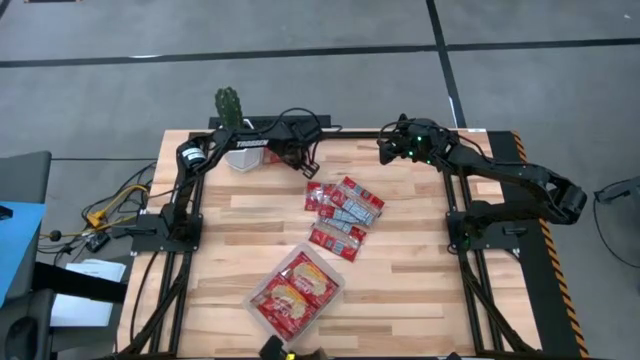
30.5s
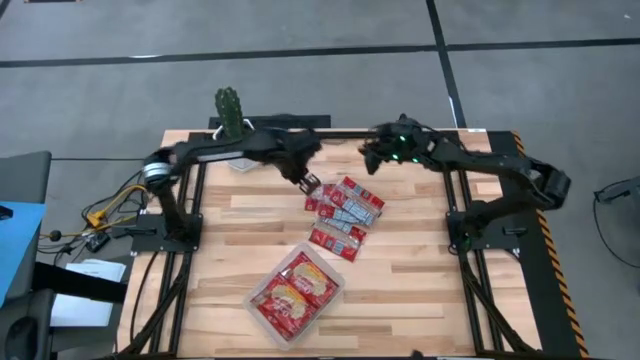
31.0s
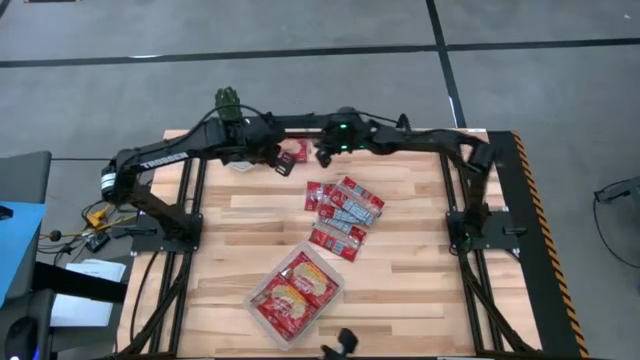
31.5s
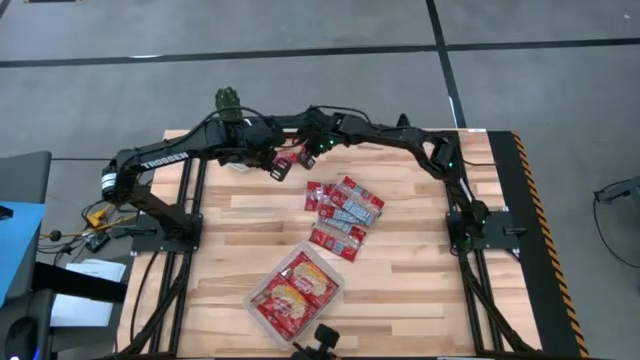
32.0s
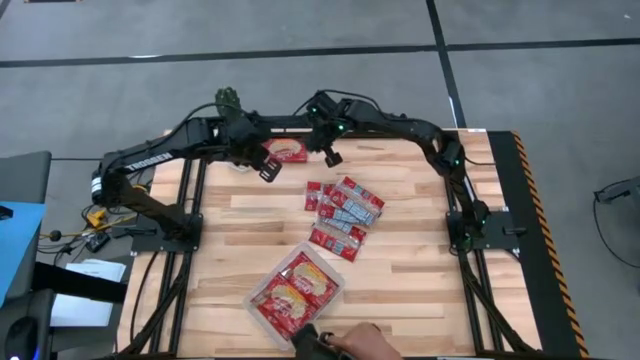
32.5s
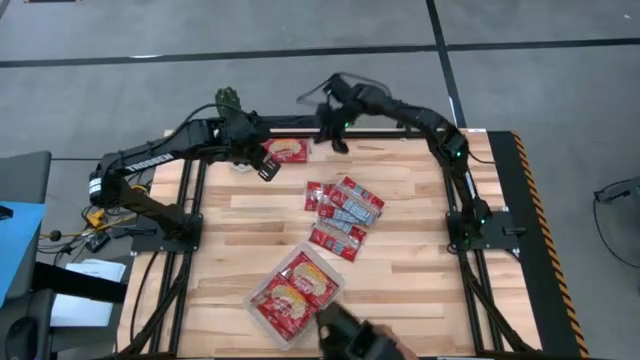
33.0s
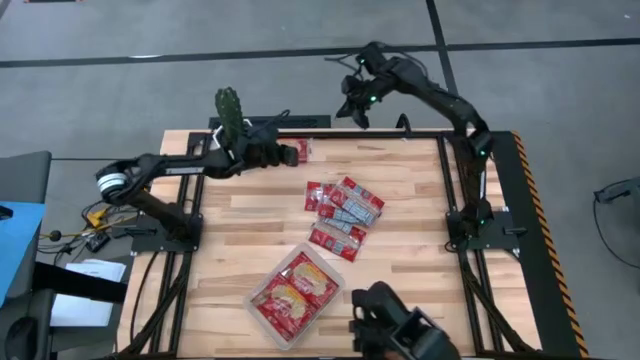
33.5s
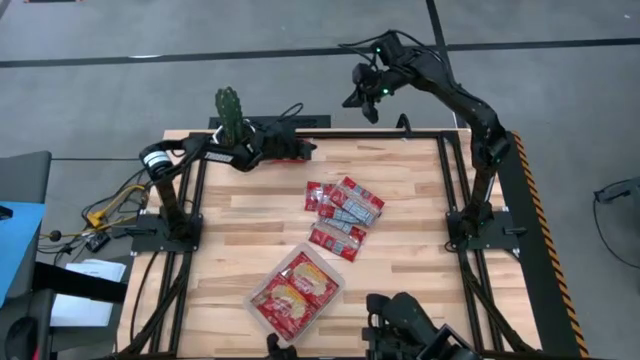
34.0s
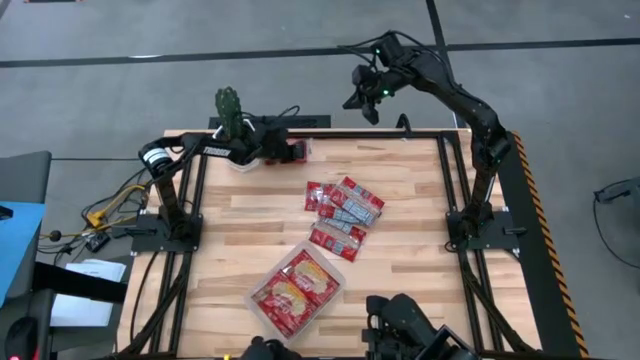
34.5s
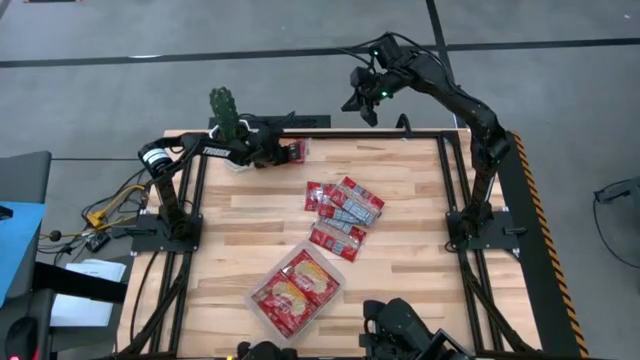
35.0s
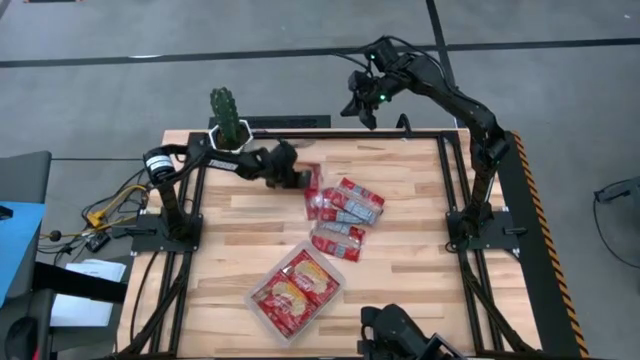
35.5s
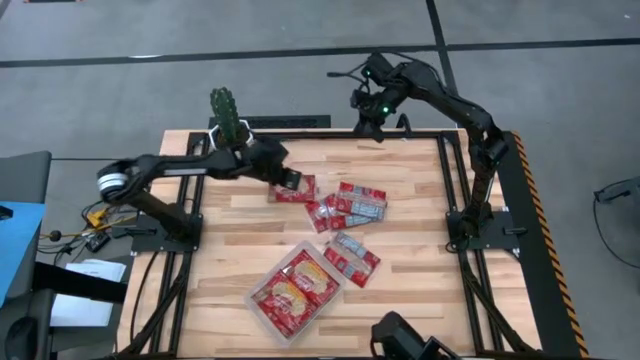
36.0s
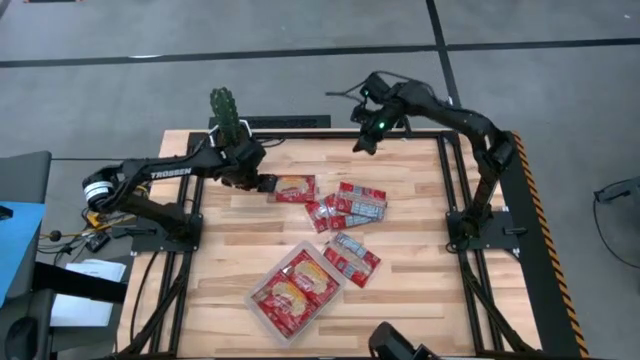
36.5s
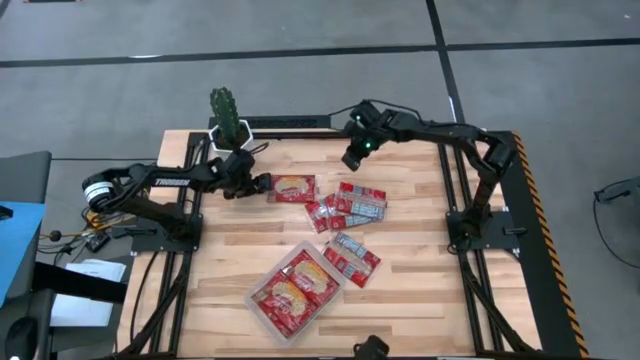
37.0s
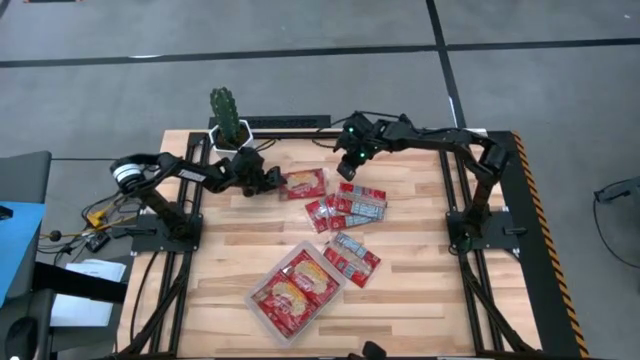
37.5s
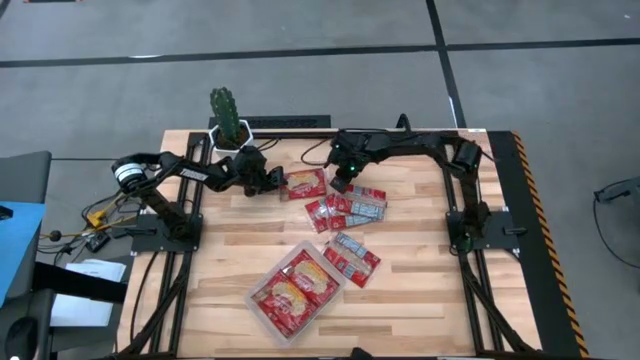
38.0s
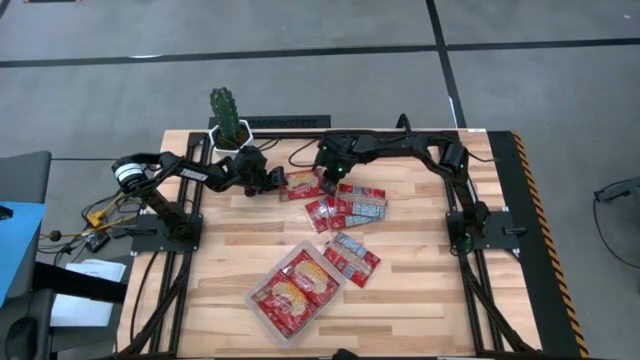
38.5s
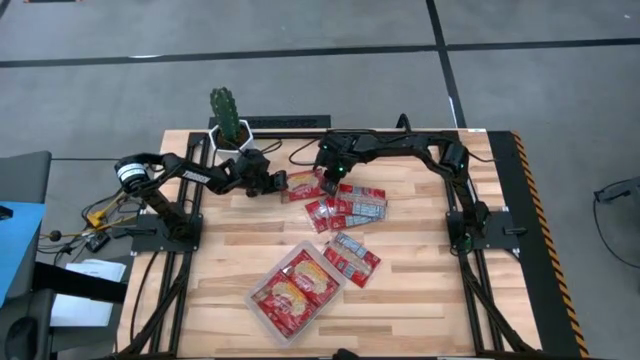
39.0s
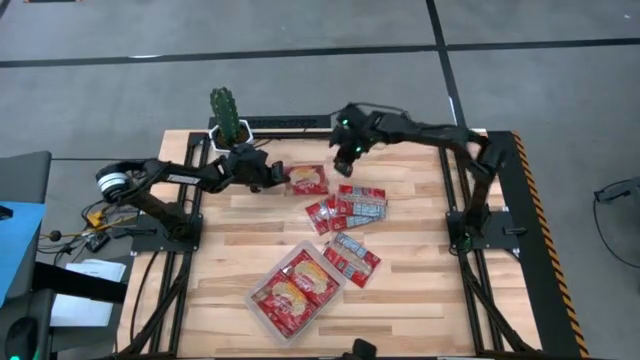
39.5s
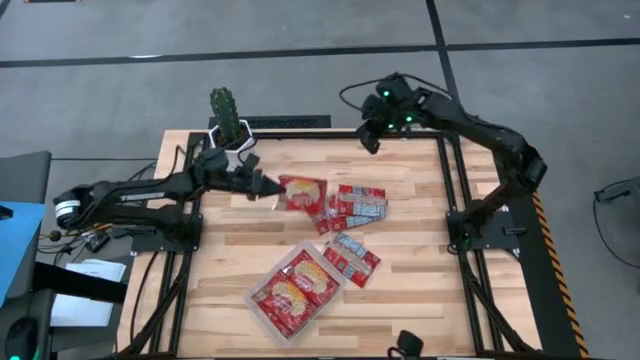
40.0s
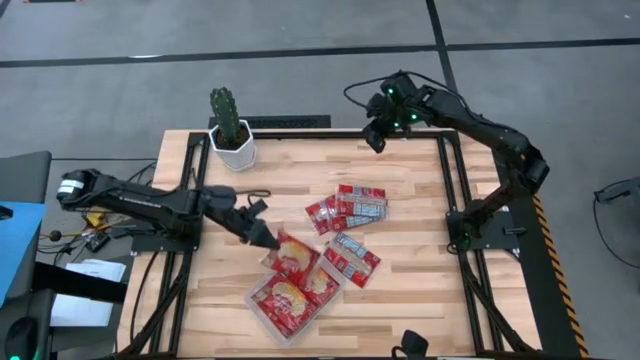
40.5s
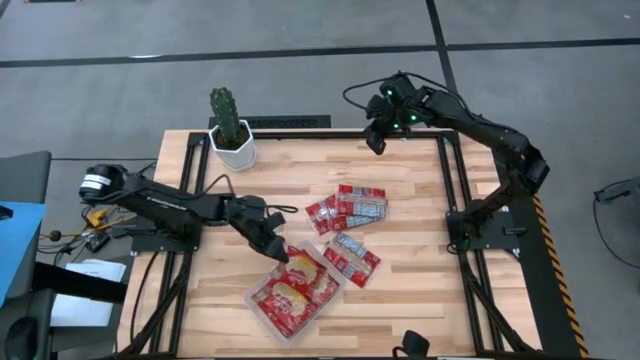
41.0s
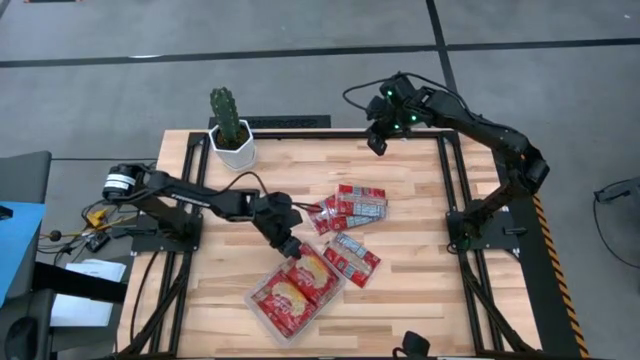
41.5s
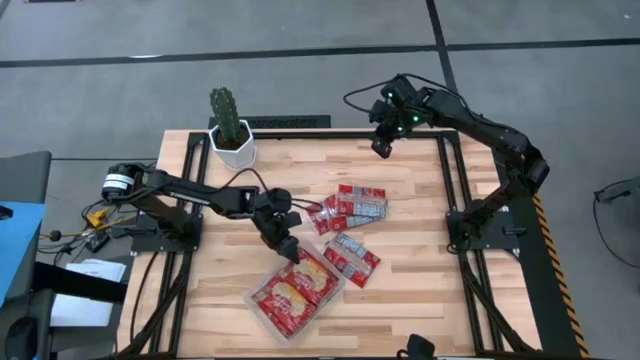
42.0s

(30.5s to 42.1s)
Task: Sort popcorn bags into baskets
Put the red popcorn bag into the transparent bin

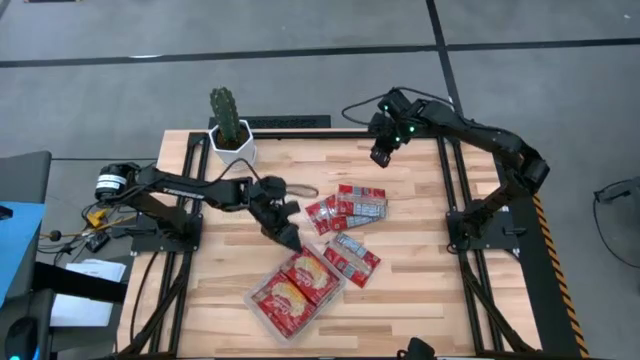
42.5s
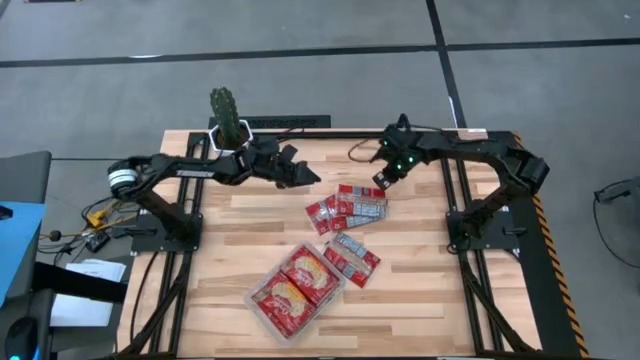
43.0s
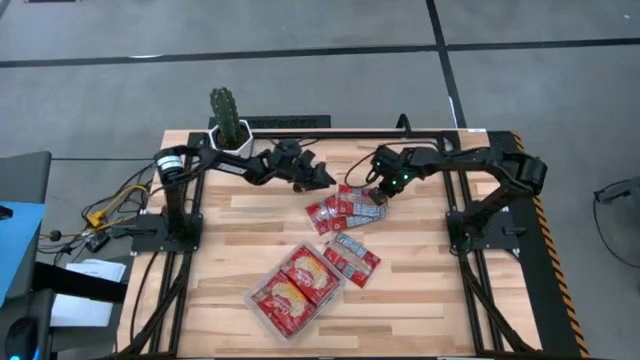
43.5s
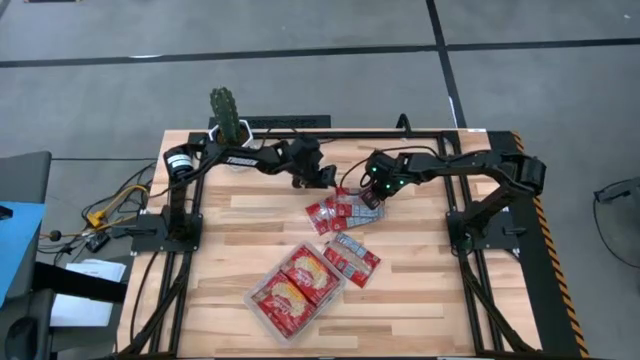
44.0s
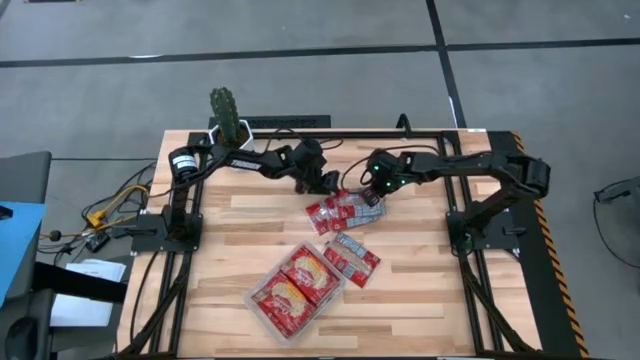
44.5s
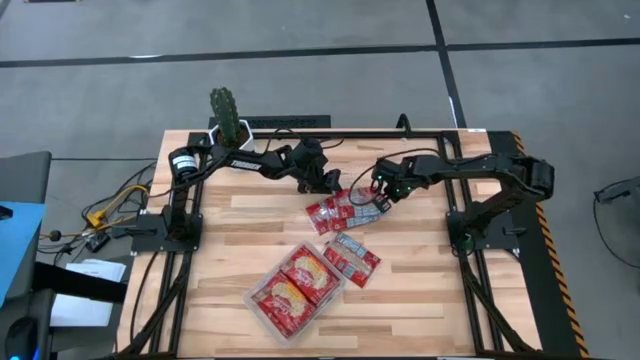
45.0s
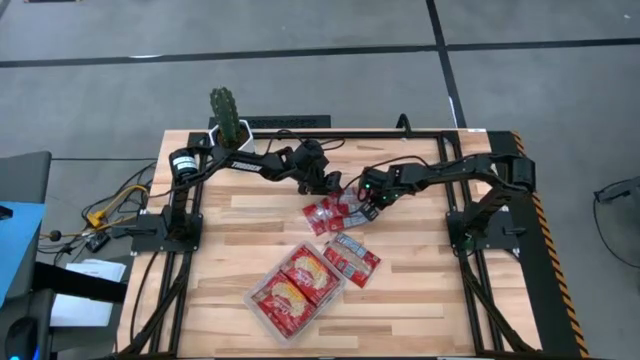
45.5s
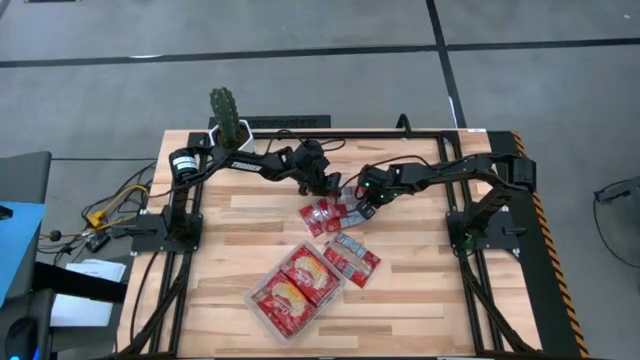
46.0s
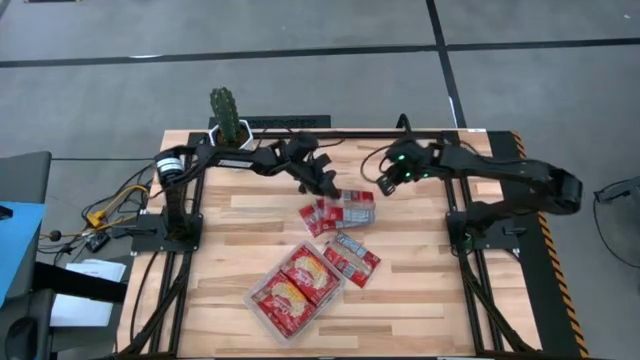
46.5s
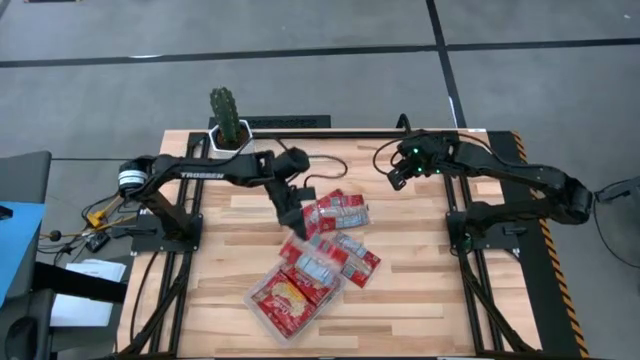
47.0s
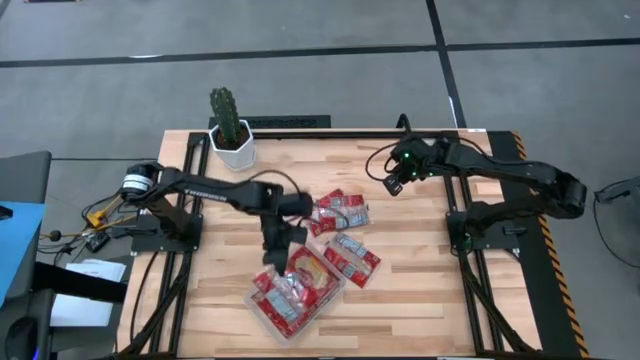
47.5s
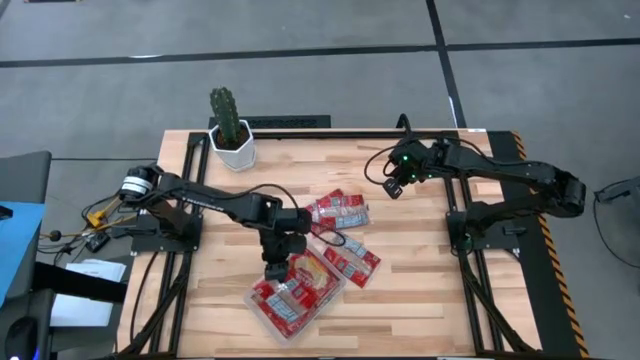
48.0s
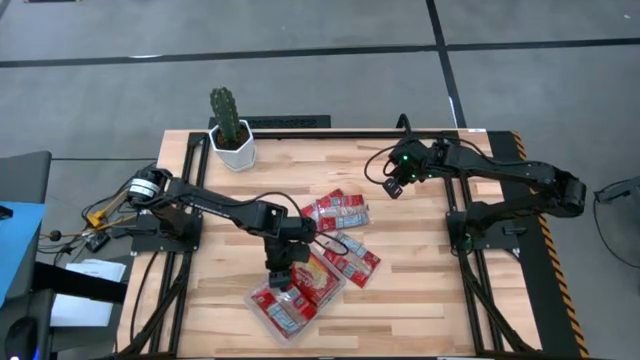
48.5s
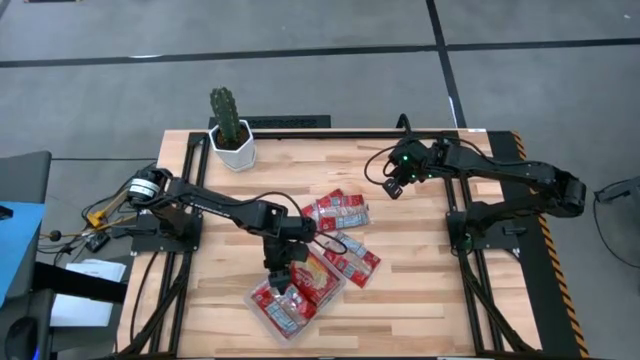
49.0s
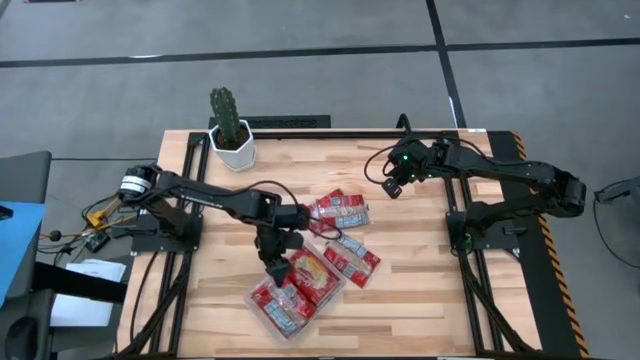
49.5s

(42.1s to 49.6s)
Put the red popcorn bag into the transparent bin

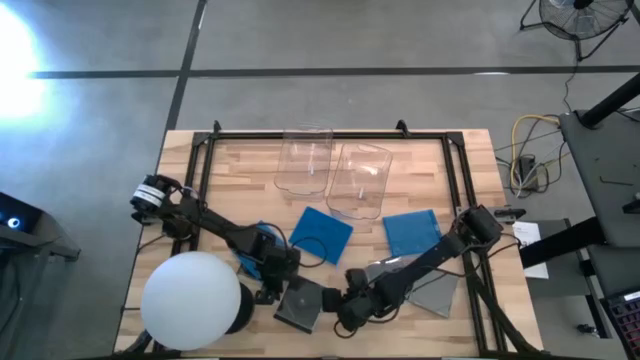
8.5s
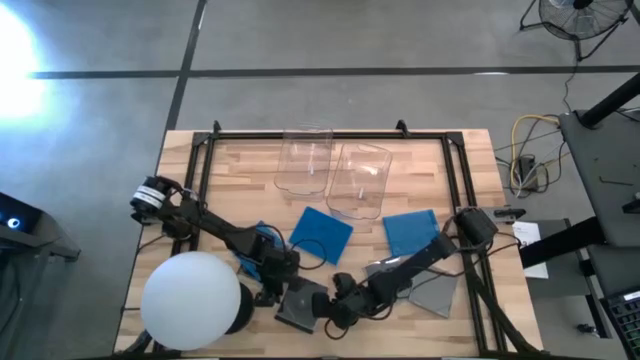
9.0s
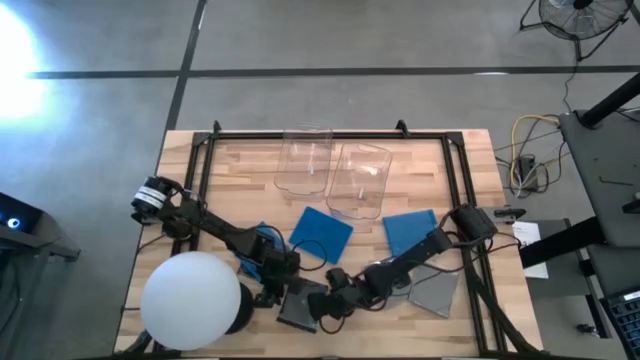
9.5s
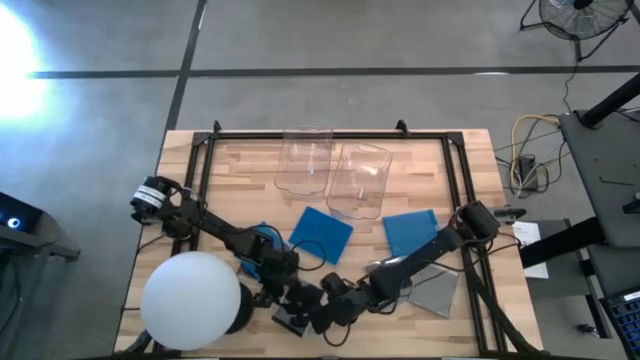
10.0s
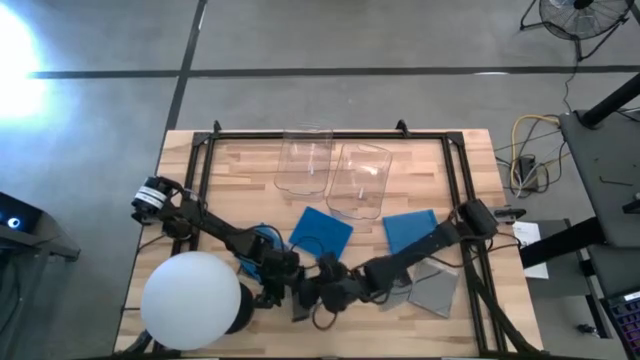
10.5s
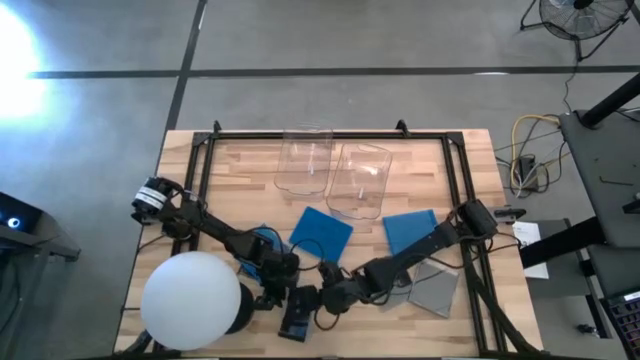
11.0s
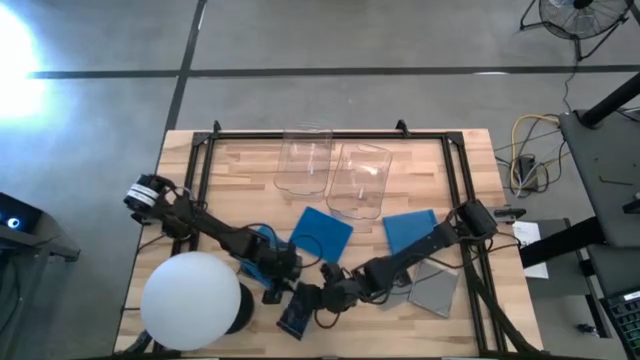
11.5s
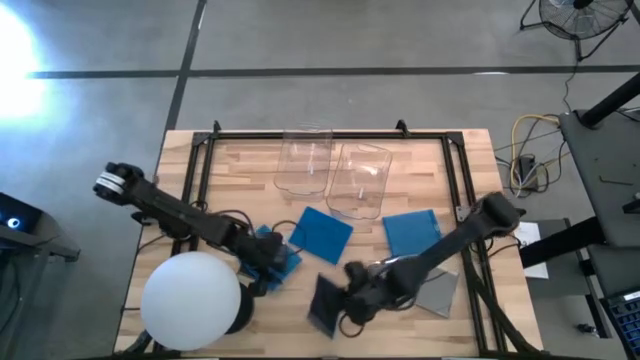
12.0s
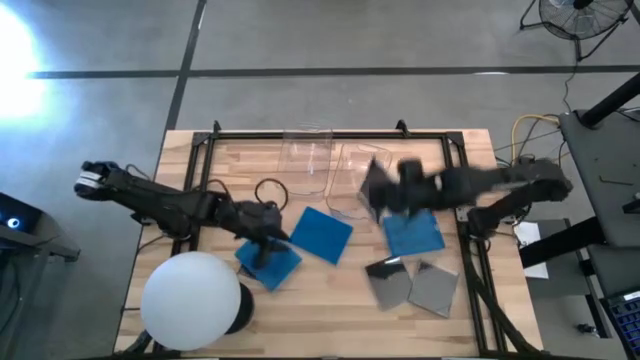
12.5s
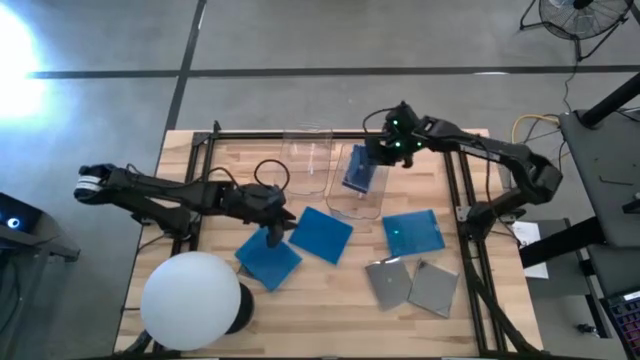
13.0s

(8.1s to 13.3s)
Task: Pick & place jewel cases by type
Put the black CD case into the right transparent bin
